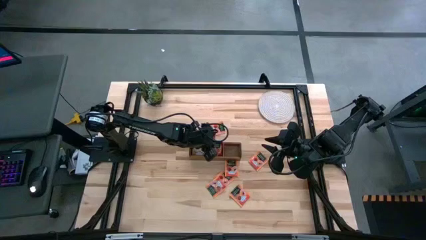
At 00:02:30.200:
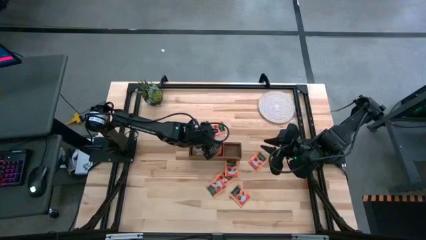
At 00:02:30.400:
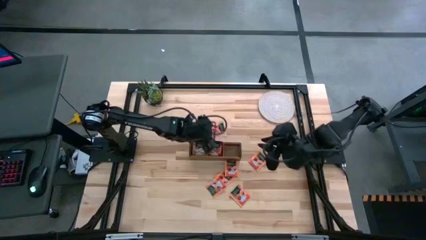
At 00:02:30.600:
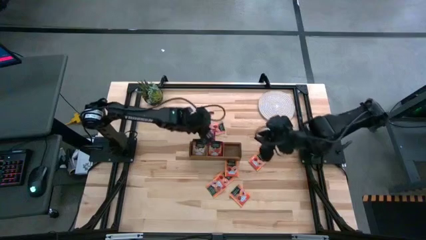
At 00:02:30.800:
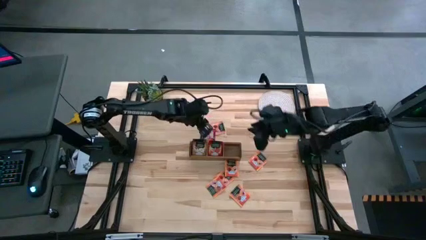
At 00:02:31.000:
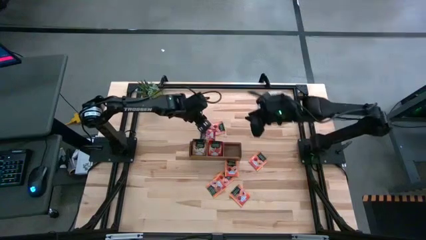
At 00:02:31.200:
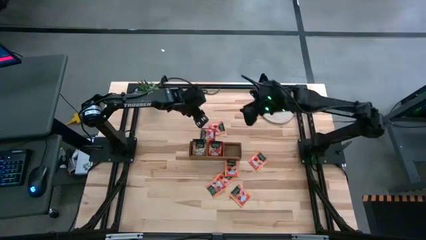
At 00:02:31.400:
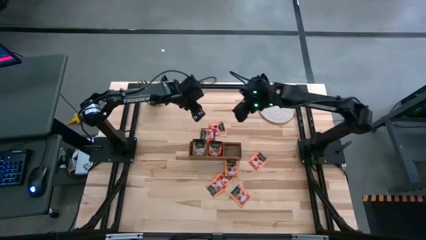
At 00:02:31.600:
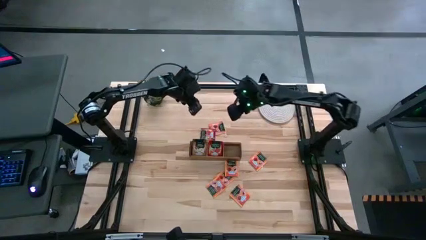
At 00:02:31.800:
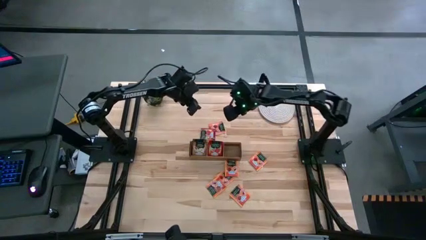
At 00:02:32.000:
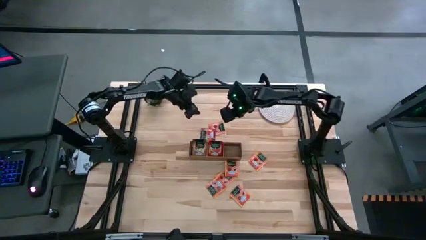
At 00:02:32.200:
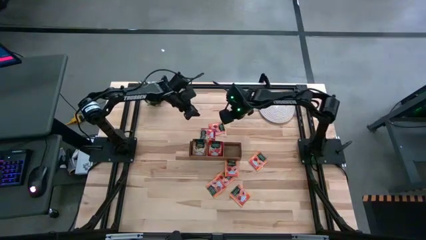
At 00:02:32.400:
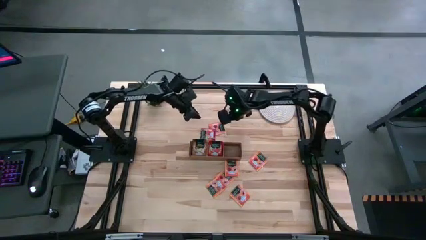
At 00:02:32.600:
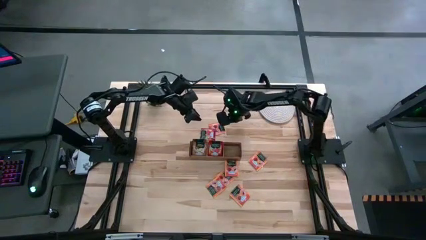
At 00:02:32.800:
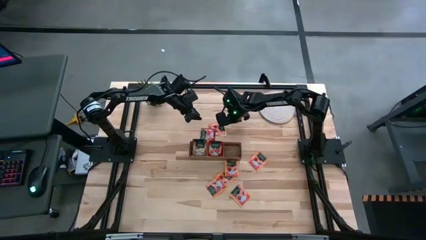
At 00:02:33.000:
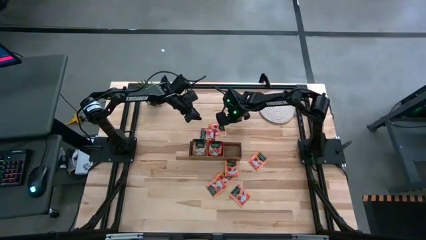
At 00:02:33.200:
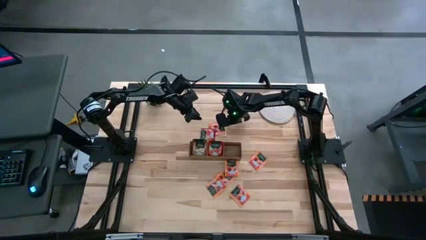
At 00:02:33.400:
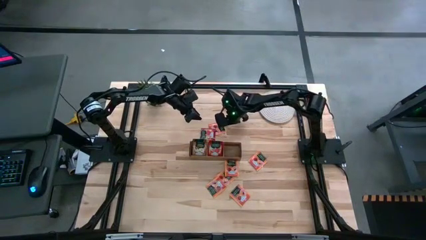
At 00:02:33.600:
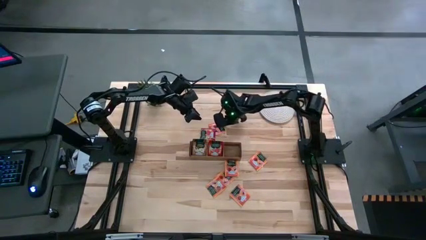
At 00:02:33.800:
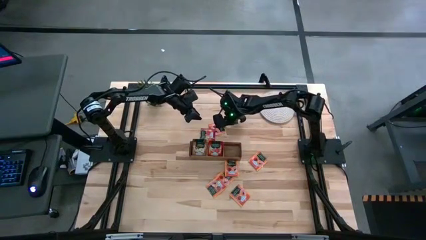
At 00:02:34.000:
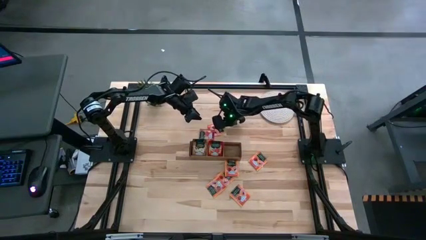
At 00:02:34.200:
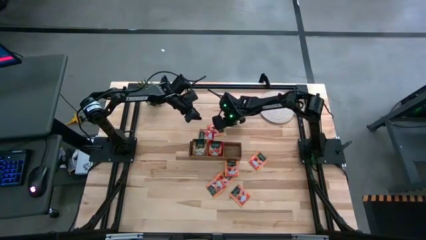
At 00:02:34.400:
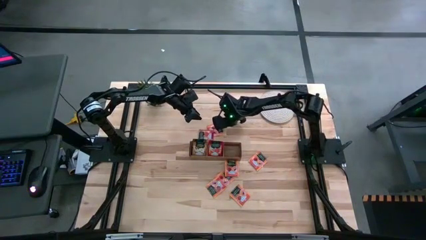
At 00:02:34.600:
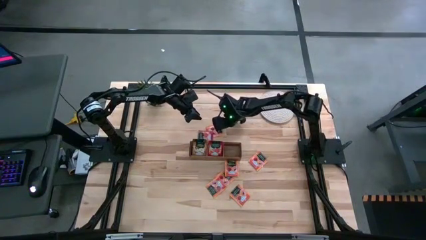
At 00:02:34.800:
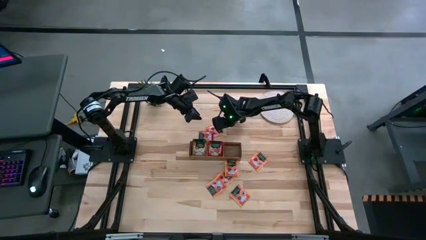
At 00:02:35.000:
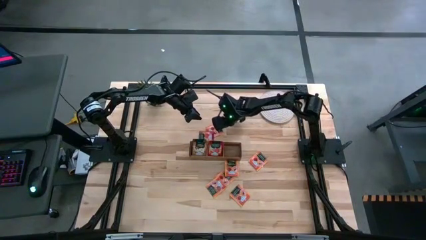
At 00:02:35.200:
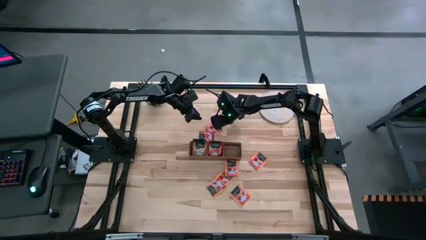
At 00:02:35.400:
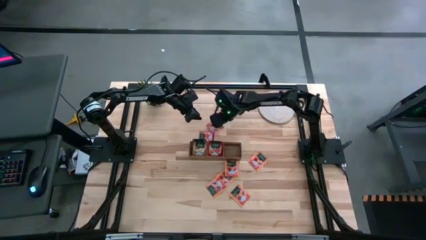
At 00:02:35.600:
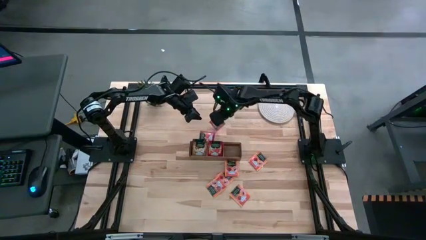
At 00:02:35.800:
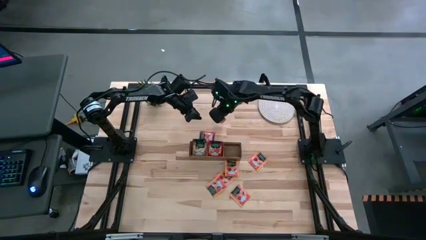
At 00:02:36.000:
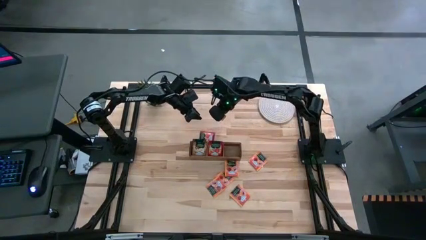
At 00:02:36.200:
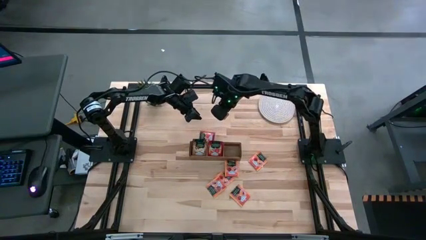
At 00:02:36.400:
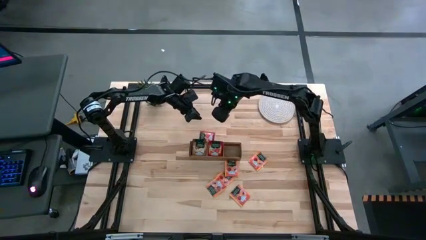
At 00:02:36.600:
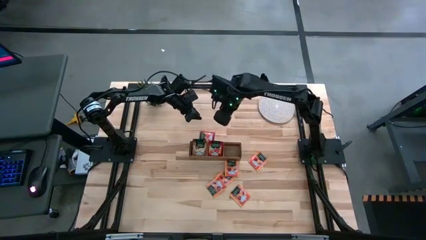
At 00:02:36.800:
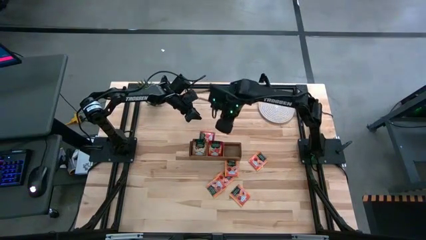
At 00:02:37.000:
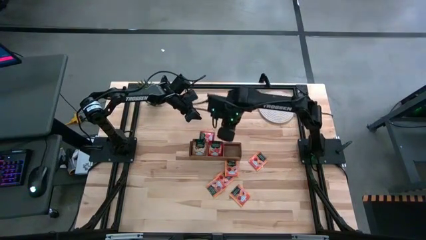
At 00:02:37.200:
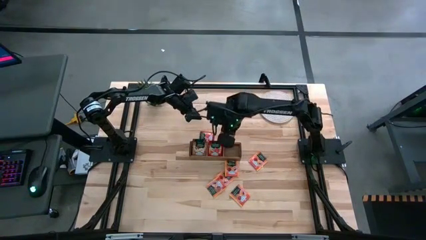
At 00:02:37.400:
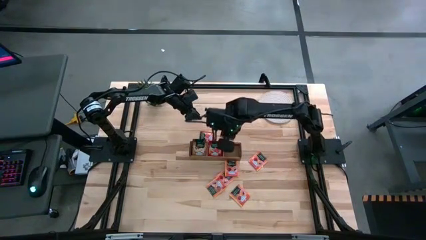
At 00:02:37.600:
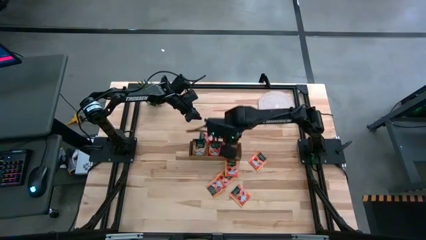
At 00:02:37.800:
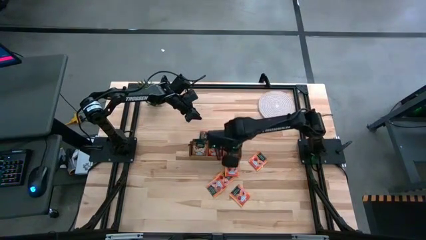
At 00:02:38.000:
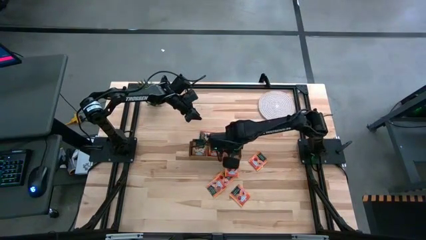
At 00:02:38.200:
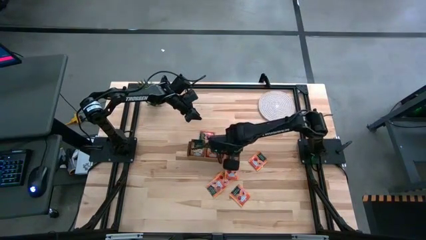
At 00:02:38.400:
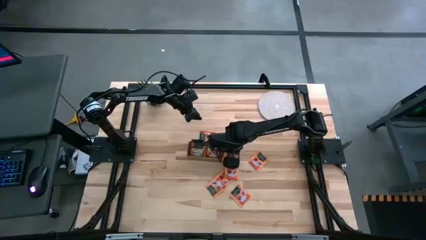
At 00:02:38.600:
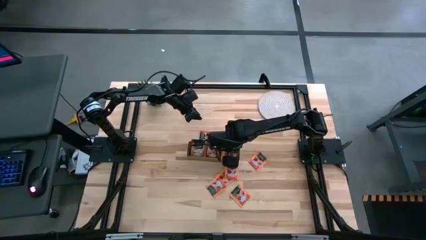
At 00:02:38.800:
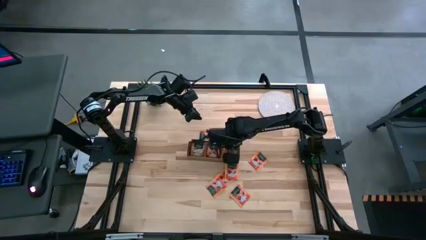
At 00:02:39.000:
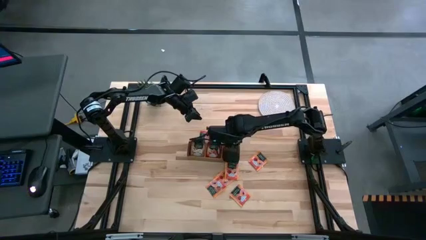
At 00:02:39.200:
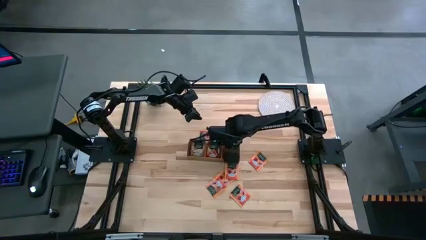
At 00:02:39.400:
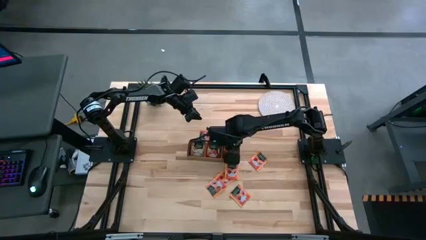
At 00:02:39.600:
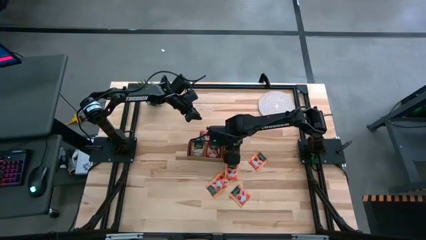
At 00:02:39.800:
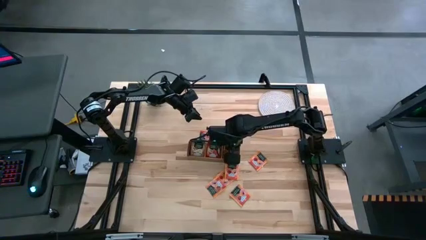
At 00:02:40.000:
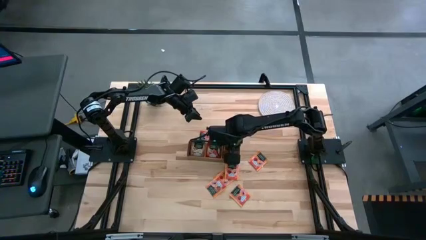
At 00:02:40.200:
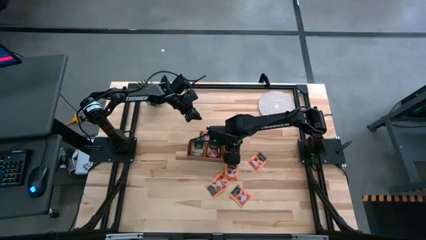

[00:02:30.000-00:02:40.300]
Task: Pick & Place Tea
Put the orange tea bag into the right section of the brown wooden organizer
